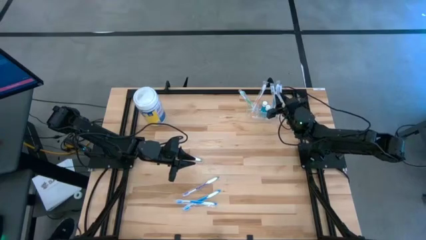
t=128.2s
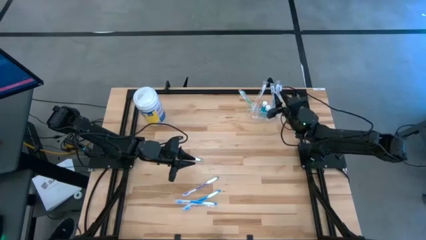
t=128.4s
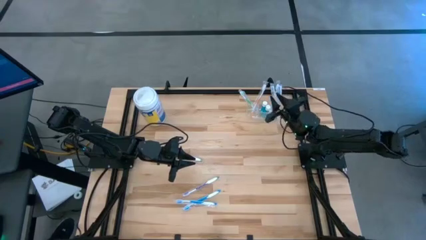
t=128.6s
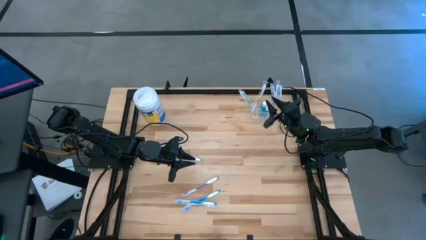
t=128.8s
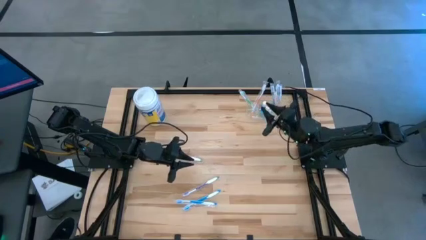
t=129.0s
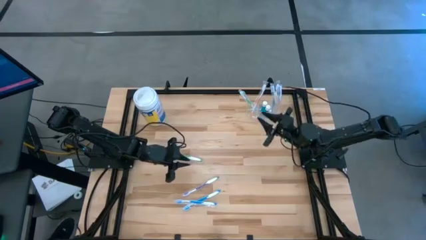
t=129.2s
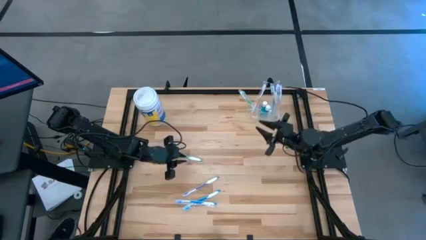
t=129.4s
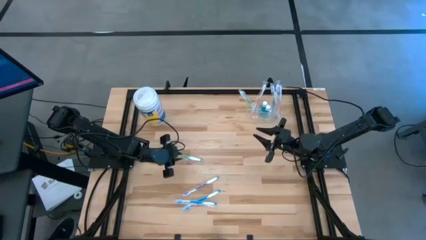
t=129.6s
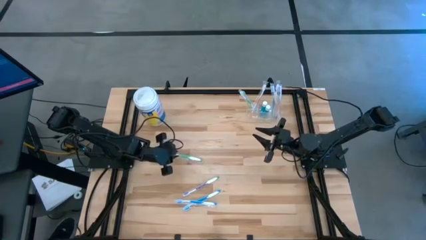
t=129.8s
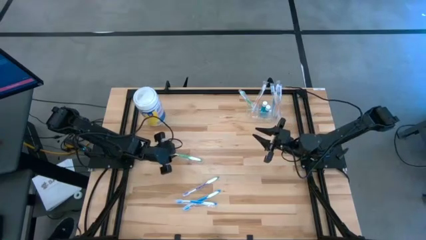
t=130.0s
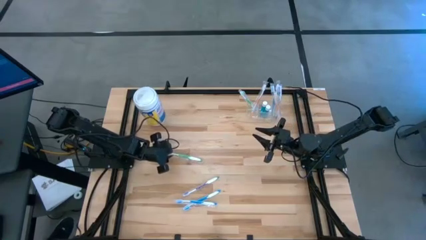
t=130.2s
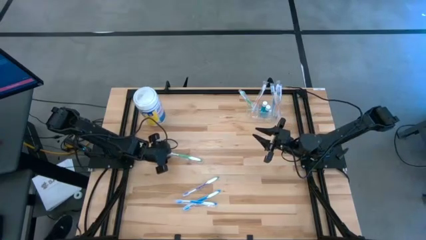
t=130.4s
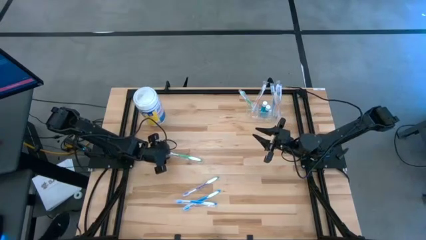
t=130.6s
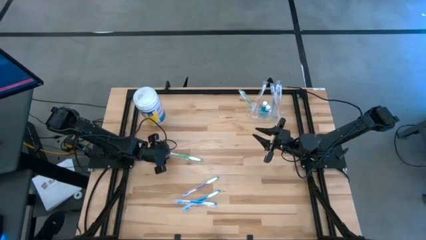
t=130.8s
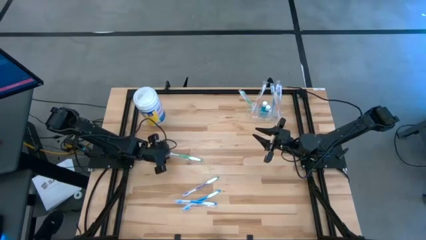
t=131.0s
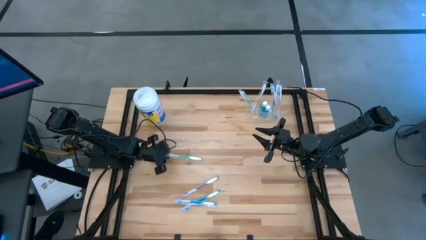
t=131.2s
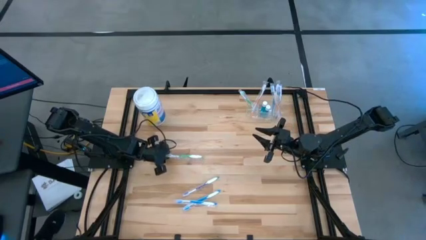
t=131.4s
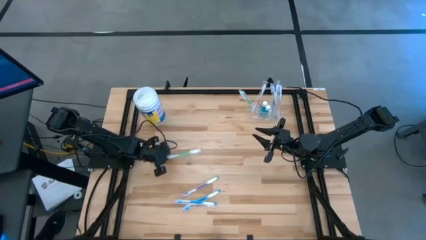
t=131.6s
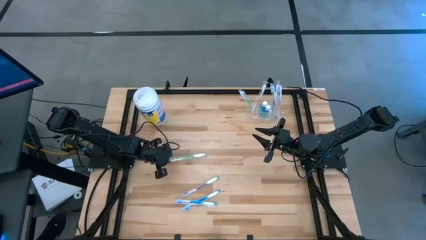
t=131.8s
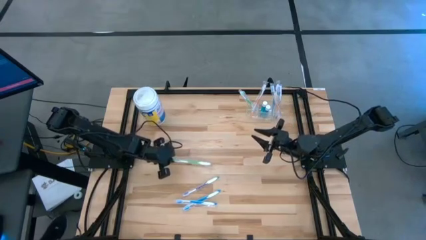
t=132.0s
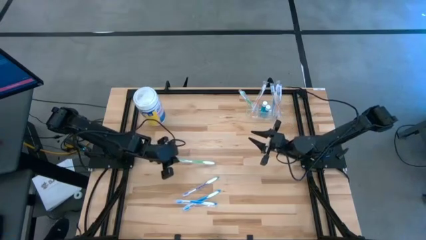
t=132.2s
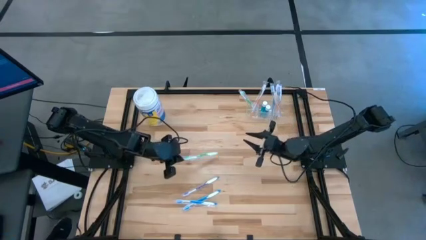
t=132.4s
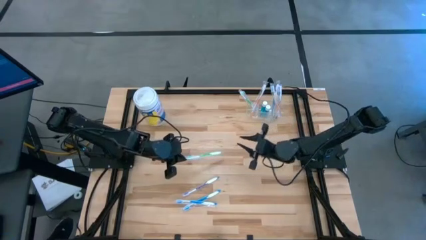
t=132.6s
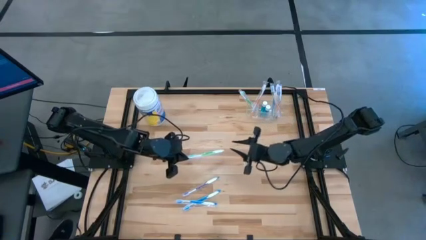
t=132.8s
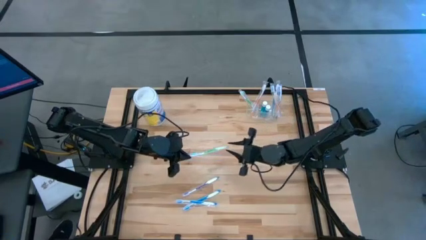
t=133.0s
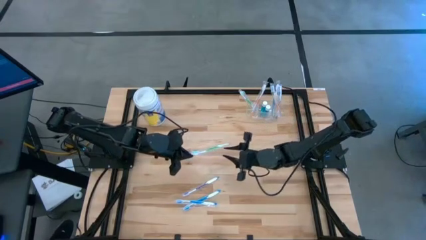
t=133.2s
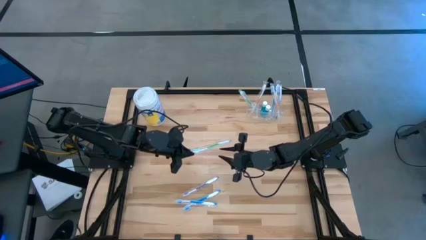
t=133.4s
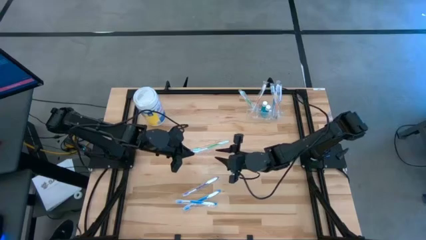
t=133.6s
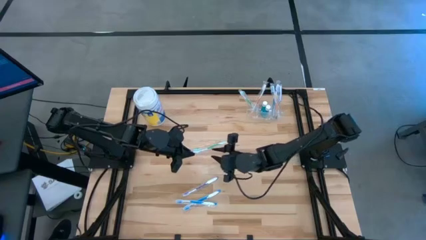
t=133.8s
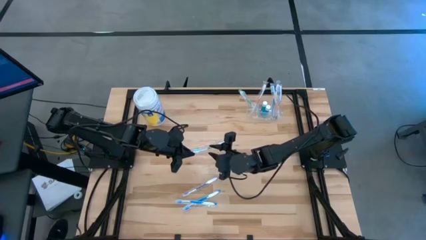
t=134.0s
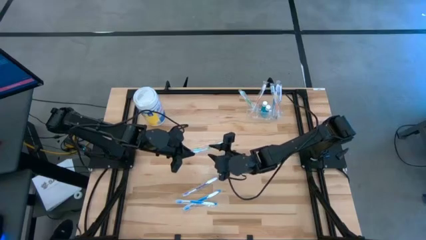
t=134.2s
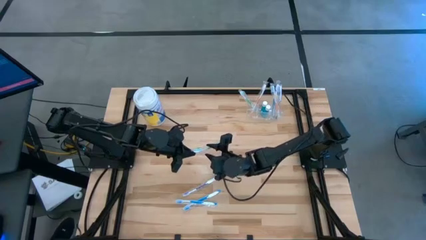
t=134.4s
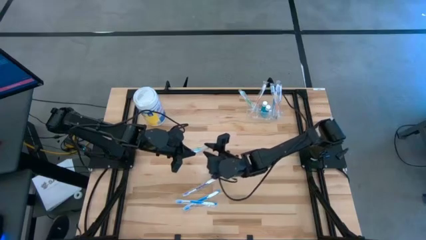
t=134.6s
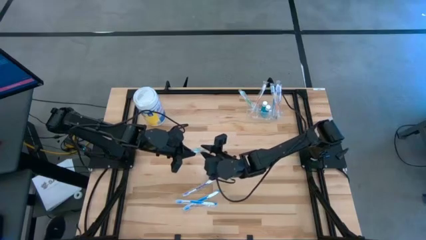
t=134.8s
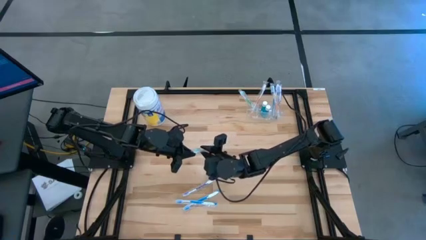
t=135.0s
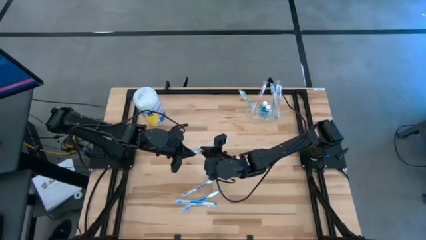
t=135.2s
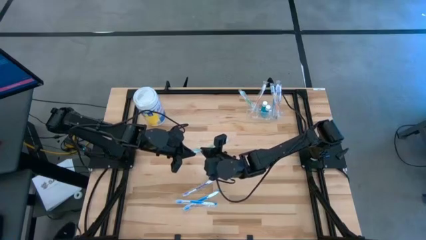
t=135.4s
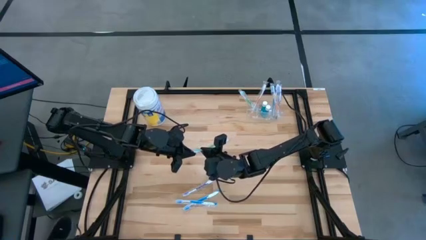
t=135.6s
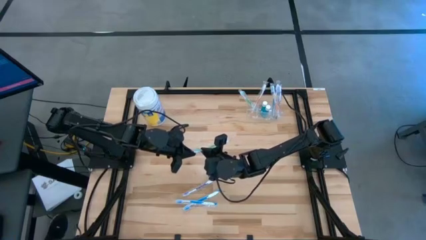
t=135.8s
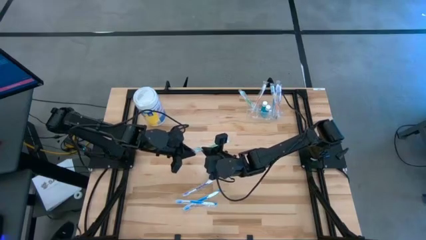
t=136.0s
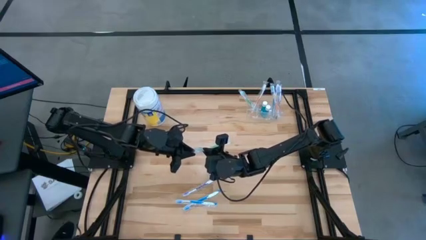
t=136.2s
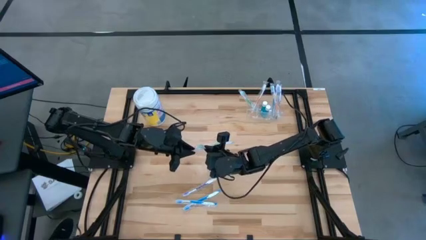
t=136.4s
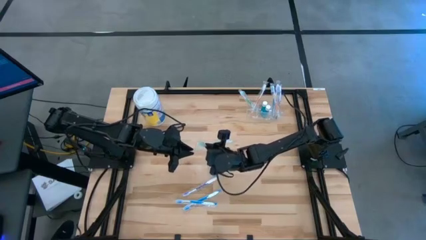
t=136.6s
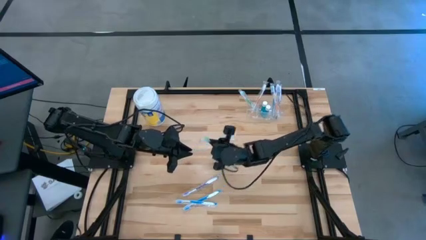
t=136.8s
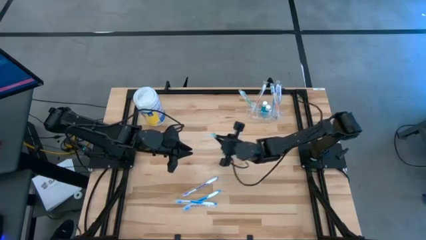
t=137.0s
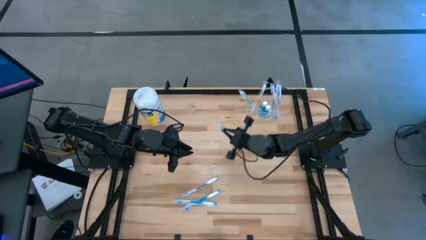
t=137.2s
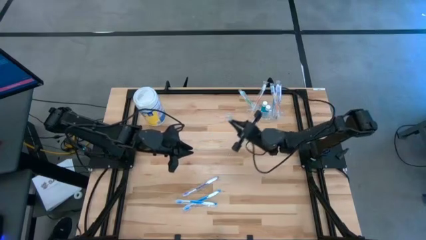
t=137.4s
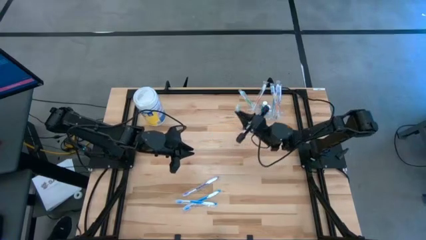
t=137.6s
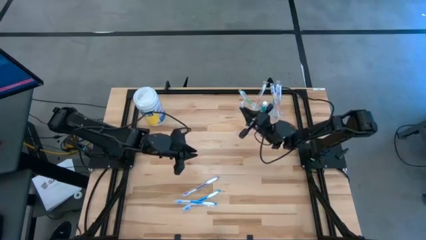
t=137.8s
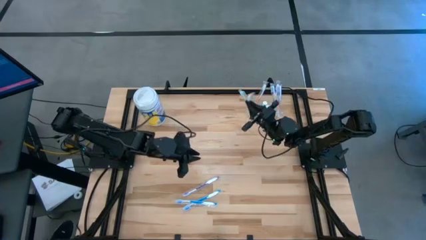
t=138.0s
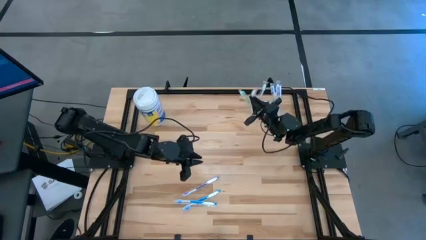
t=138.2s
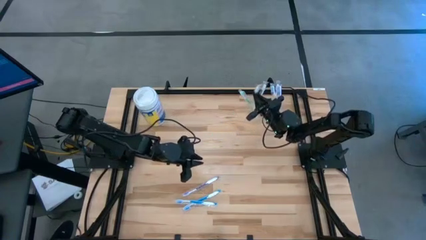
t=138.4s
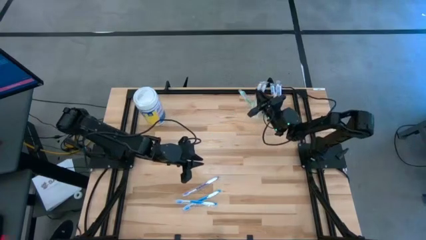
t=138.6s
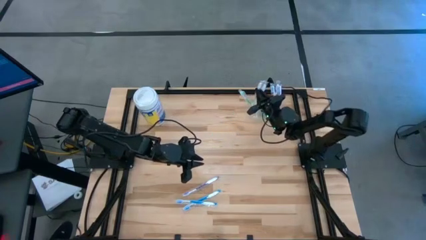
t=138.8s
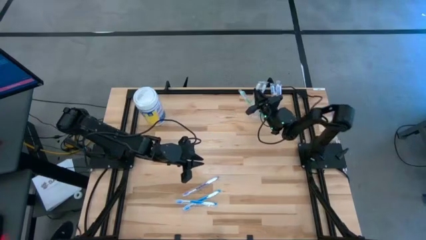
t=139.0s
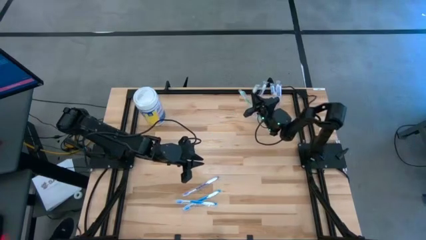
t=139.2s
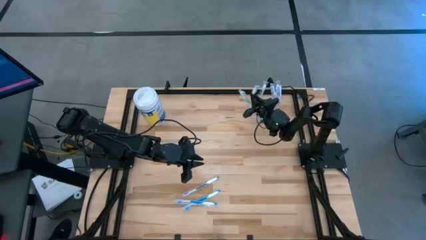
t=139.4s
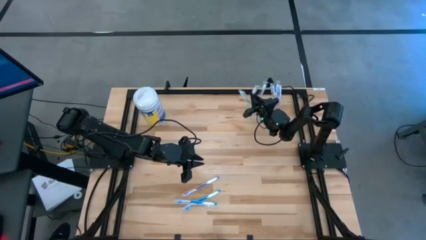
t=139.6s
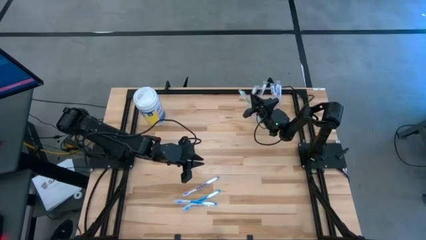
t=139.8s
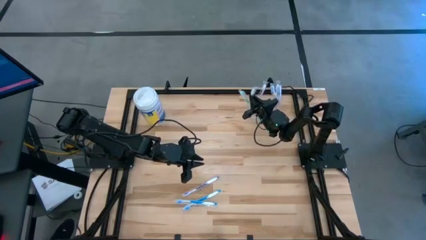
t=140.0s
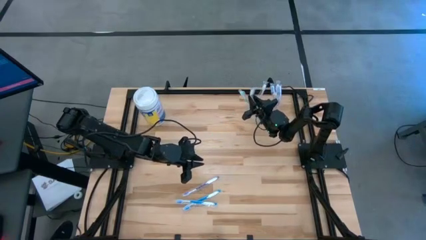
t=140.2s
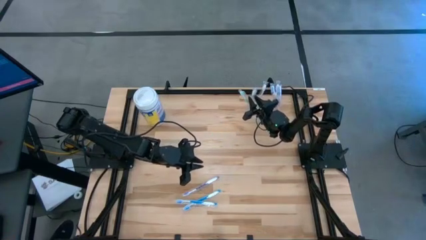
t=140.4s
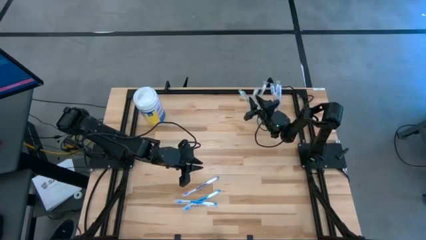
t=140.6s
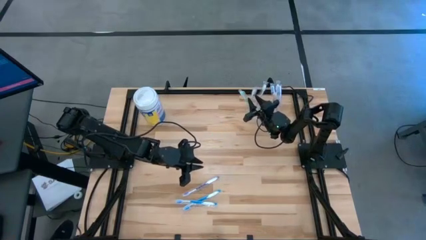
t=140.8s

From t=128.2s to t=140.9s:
Task: Pick & Place toothbrushing station
Put the green toothbrush into the left transparent organizer

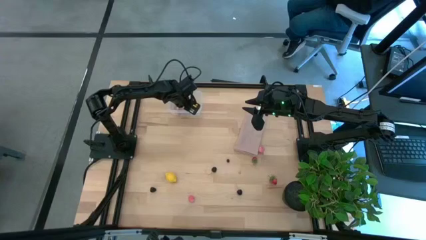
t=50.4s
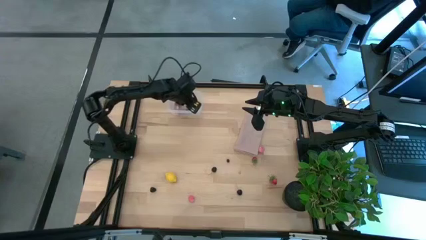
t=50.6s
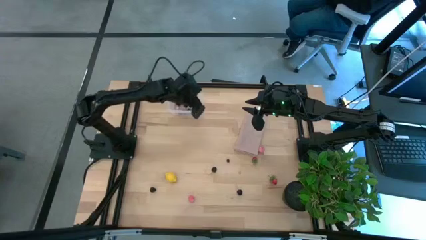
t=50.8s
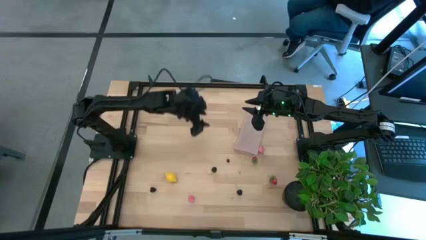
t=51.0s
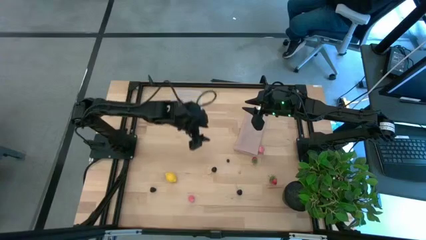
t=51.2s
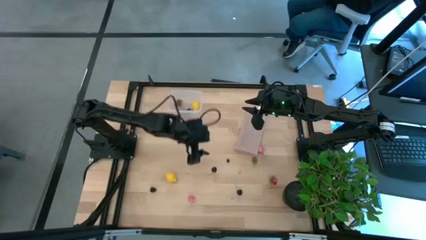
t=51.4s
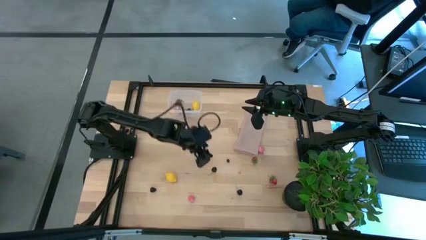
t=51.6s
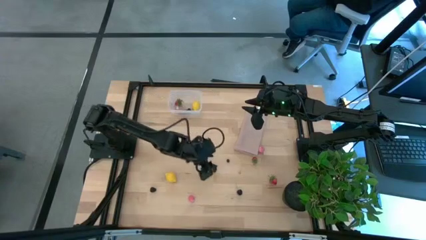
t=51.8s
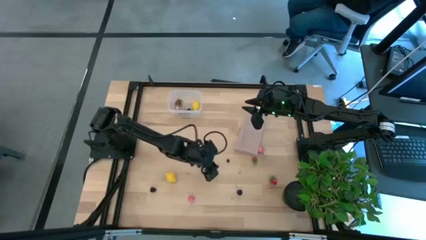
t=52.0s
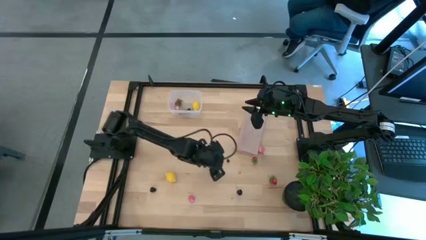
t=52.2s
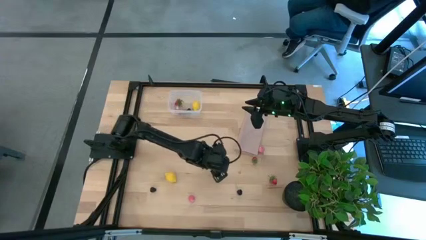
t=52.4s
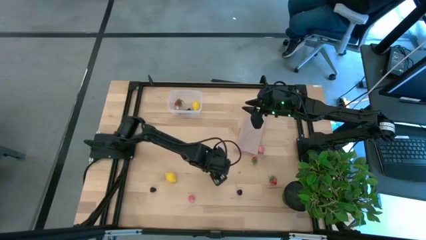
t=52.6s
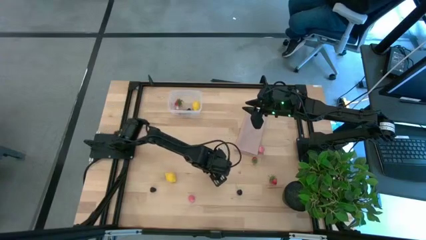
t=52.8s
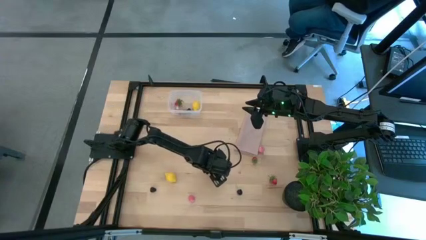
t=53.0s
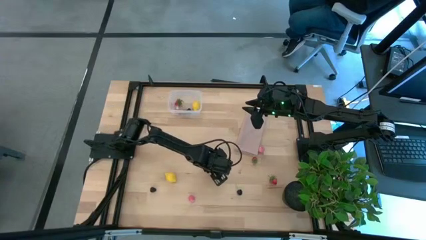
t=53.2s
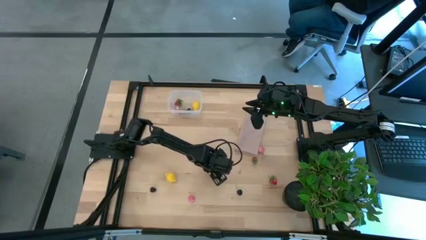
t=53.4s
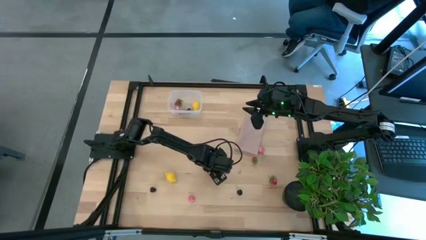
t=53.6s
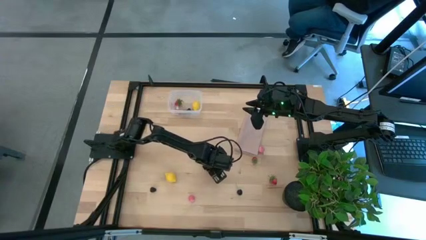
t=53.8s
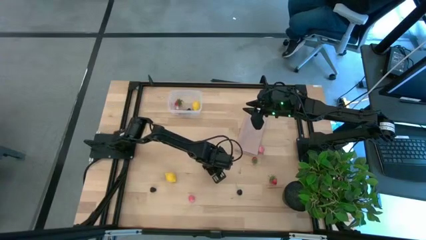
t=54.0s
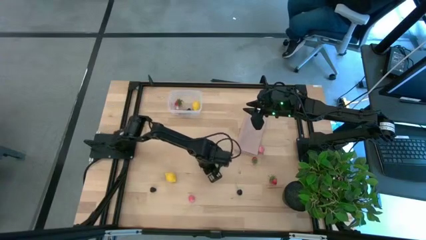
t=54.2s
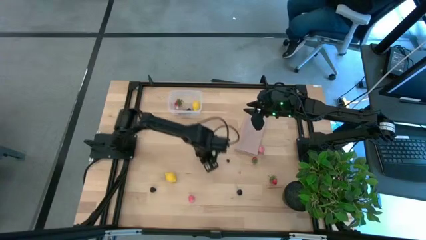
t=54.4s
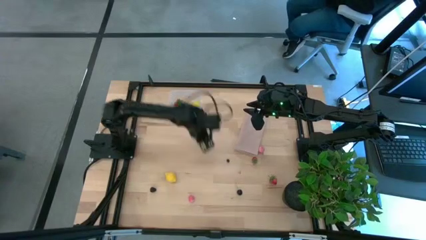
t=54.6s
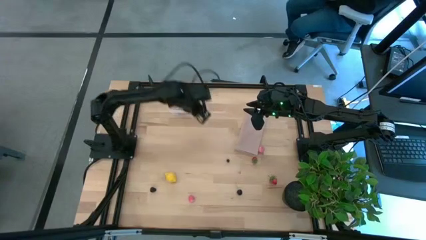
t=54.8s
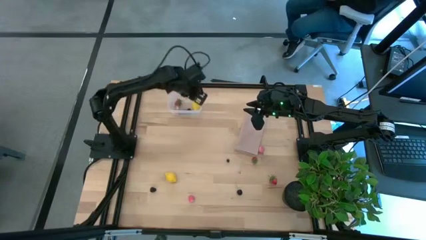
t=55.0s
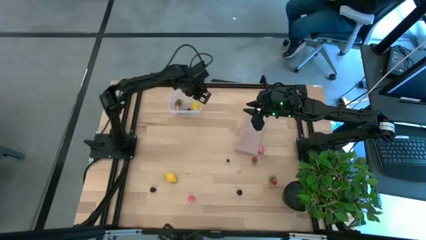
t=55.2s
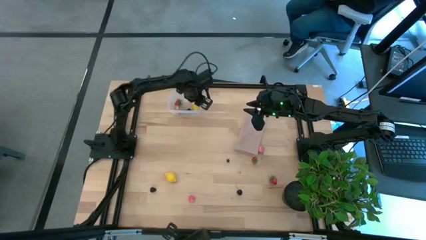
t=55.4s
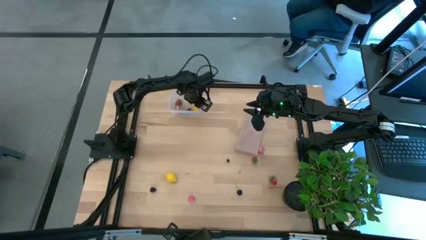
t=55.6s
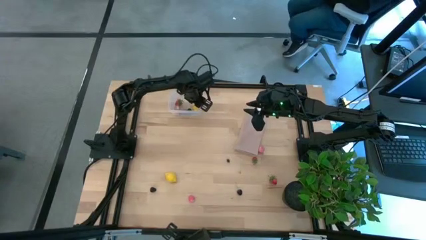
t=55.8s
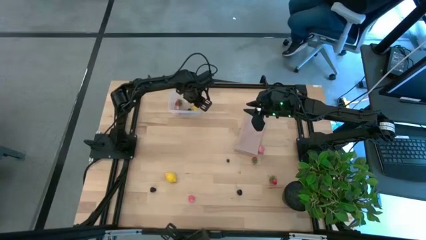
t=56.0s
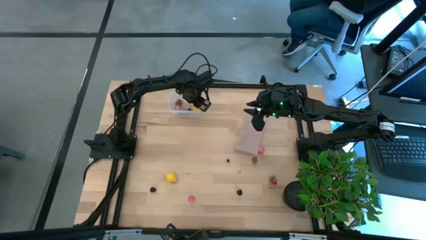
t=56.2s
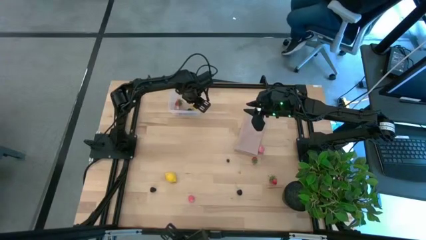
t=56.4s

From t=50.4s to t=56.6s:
Task: Pick and placing Produce into tupperware
Put the black cherry into the transparent bin
